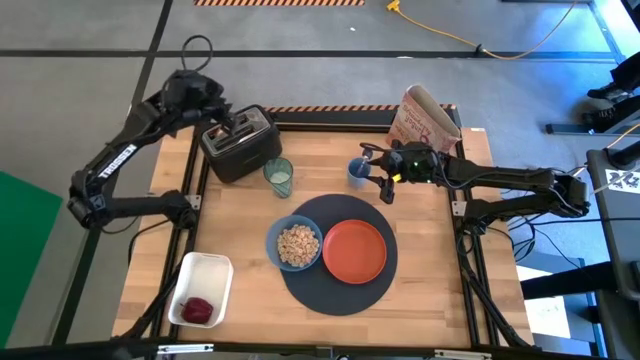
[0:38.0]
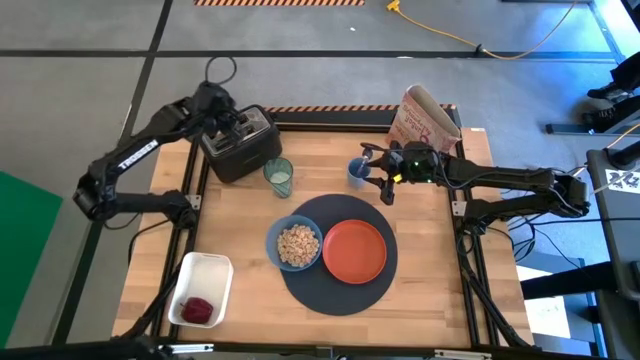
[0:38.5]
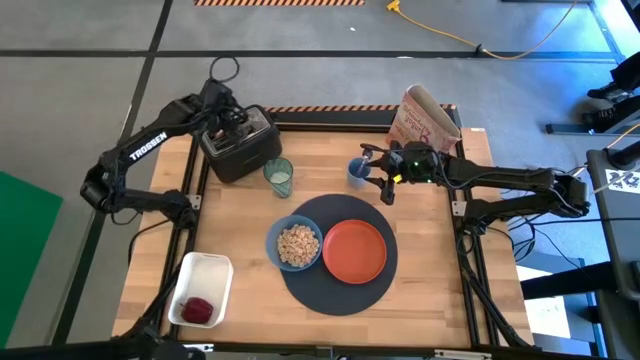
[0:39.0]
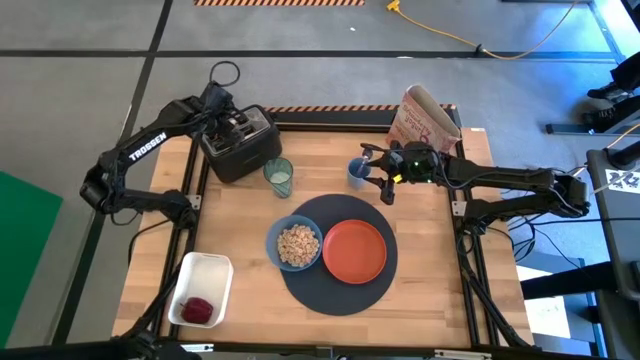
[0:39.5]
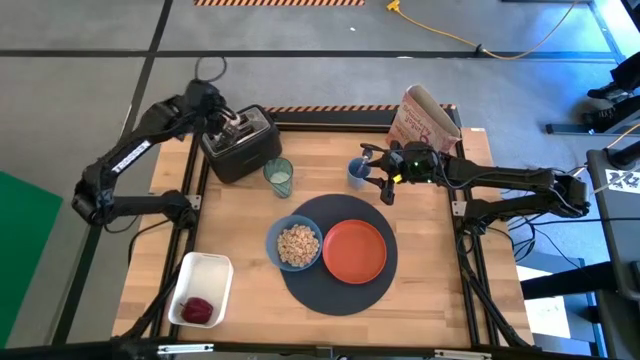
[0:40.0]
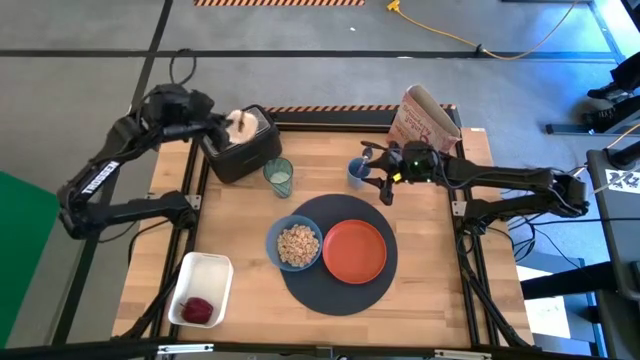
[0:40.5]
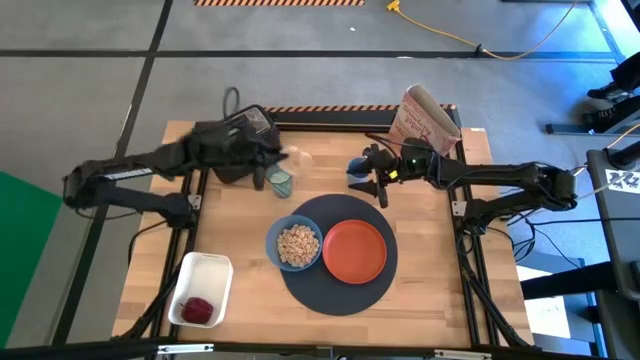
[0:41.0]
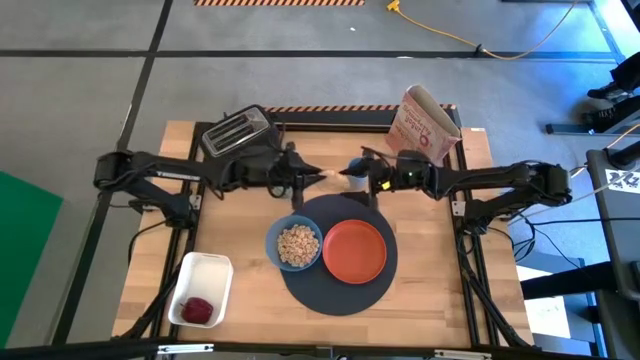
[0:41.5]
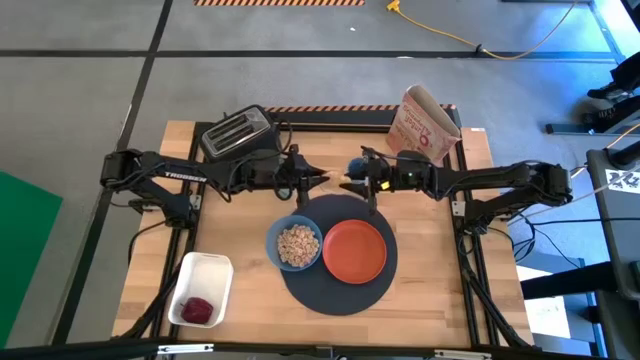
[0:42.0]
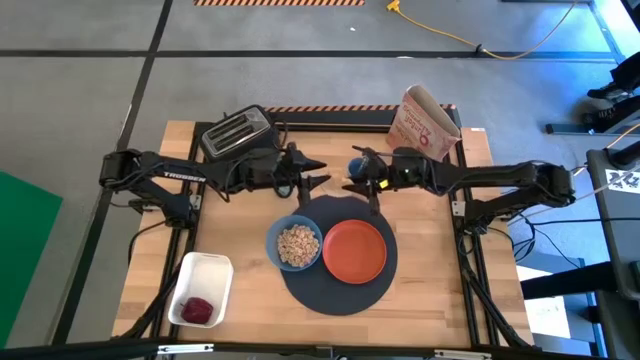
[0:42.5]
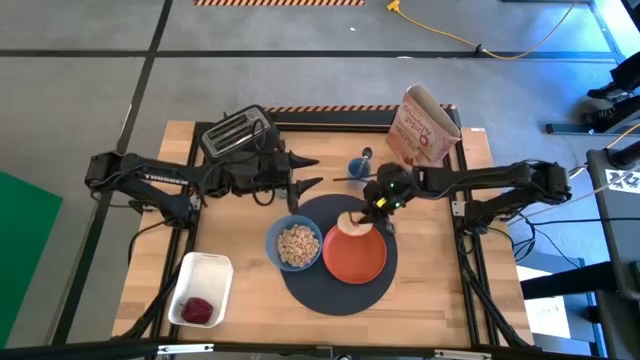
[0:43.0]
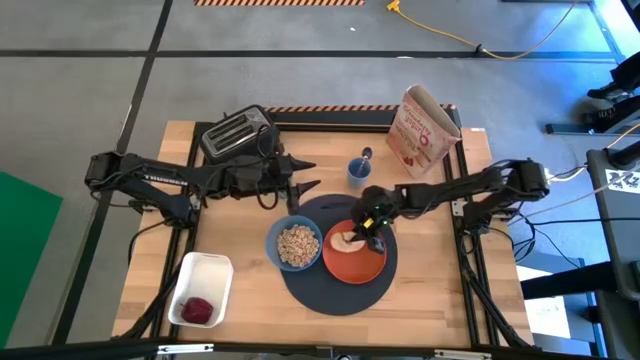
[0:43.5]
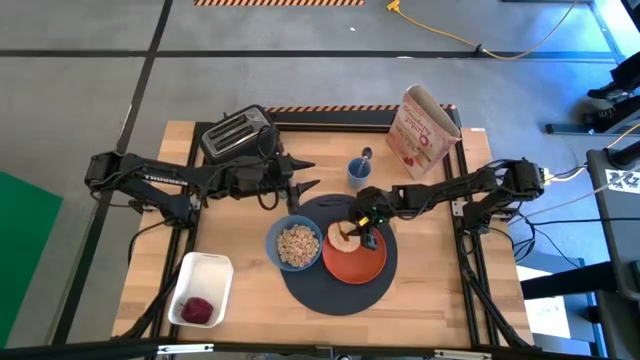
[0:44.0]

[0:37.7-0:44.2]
Task: Arrange a breakfast setting
Put the toasted bagel on the orange plate

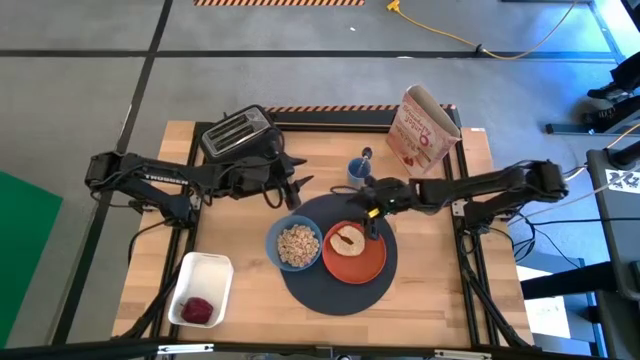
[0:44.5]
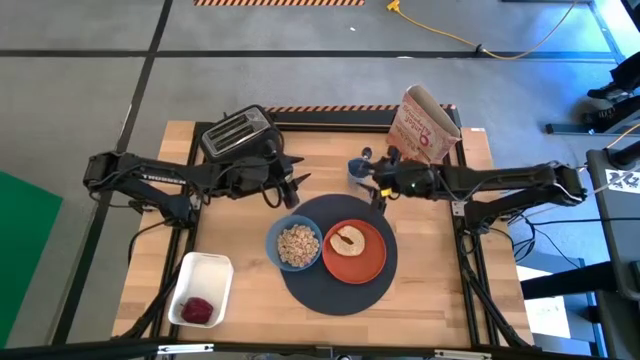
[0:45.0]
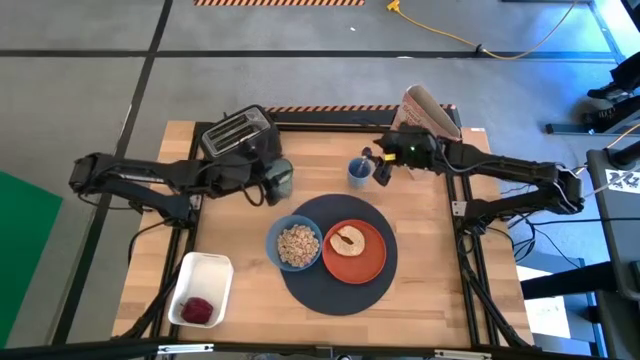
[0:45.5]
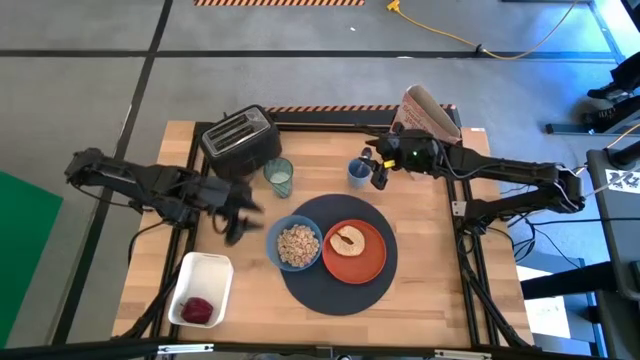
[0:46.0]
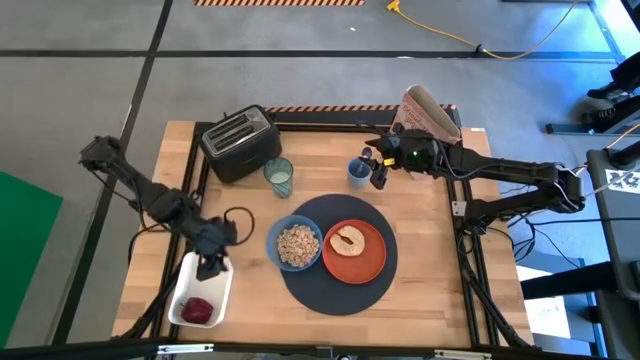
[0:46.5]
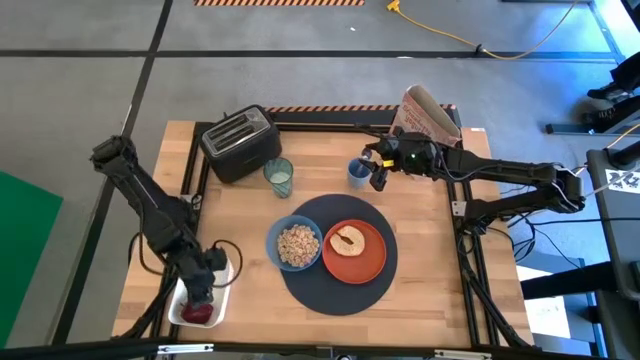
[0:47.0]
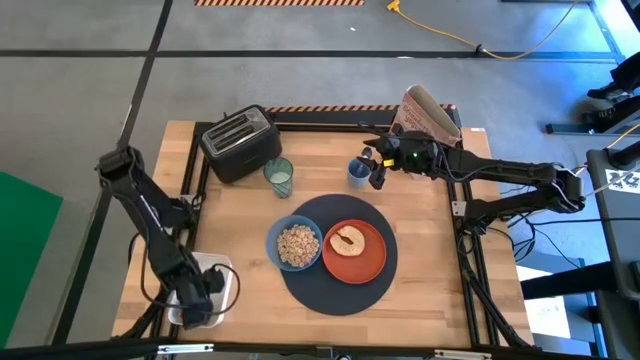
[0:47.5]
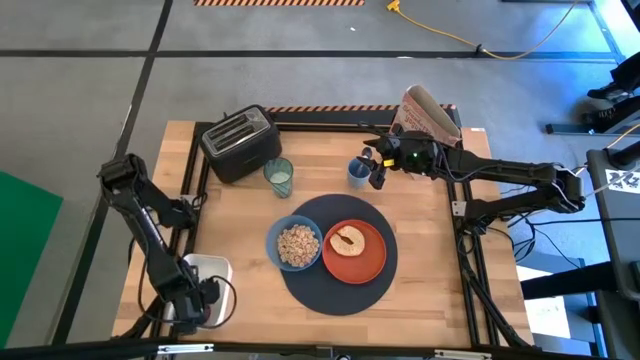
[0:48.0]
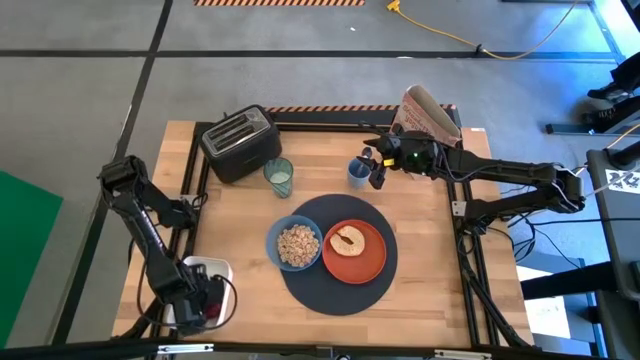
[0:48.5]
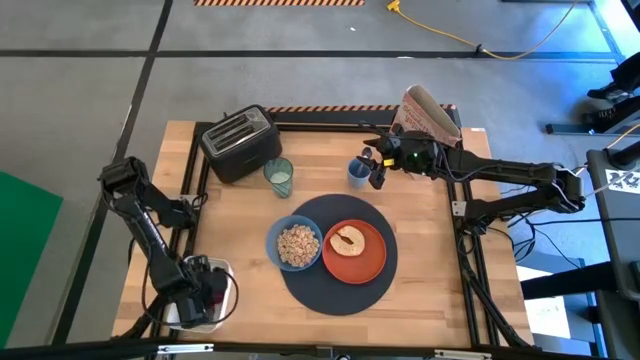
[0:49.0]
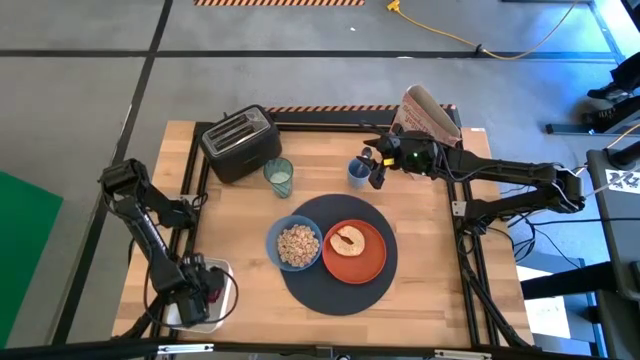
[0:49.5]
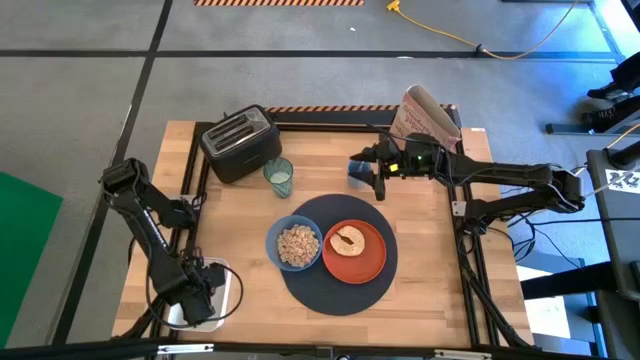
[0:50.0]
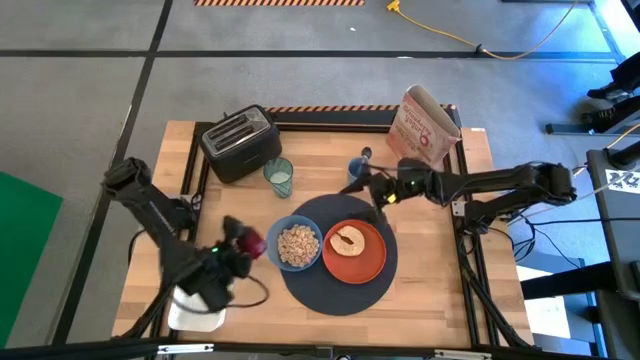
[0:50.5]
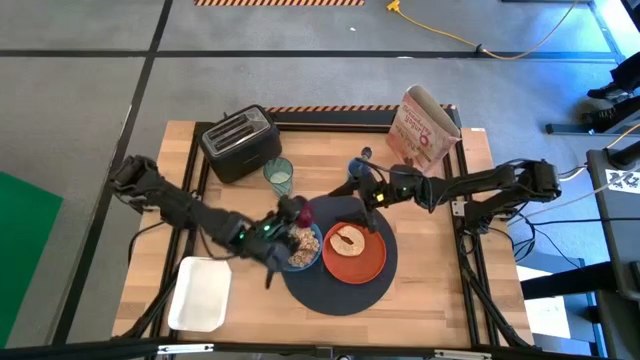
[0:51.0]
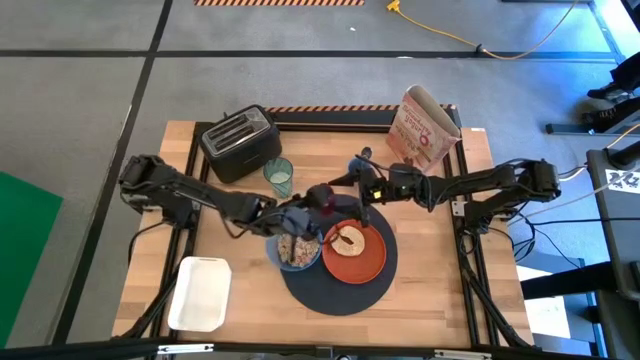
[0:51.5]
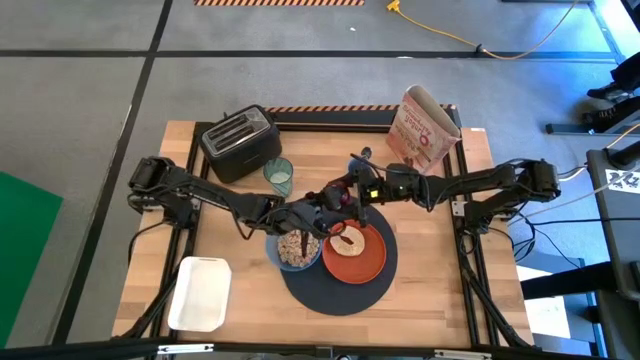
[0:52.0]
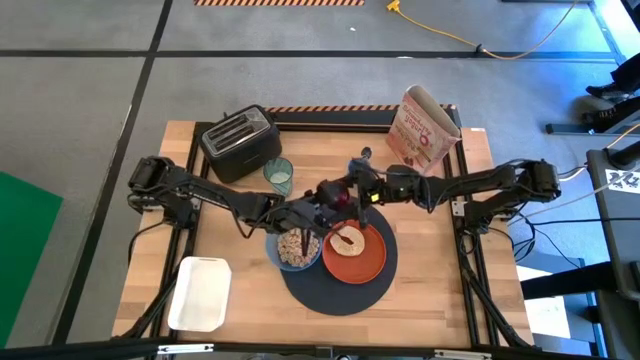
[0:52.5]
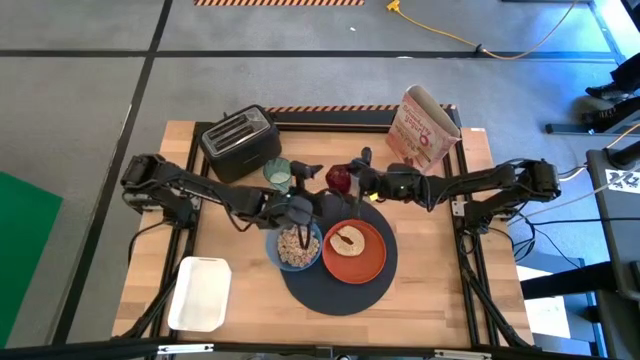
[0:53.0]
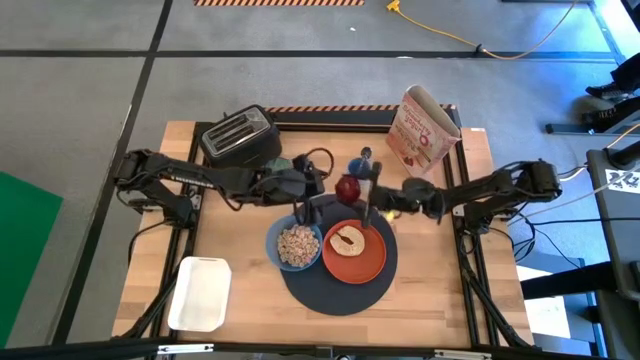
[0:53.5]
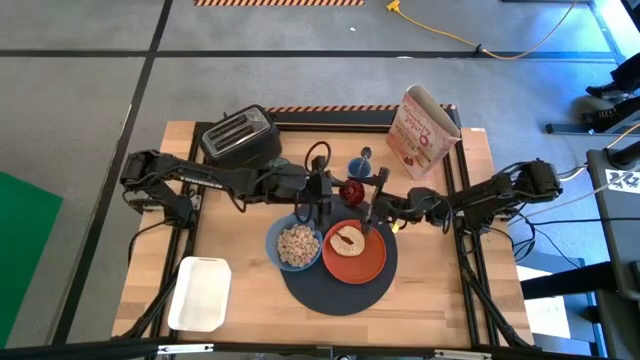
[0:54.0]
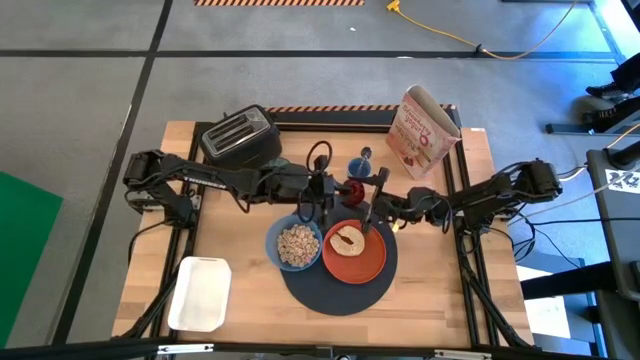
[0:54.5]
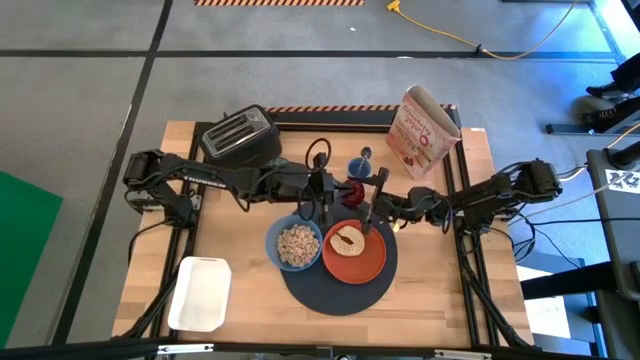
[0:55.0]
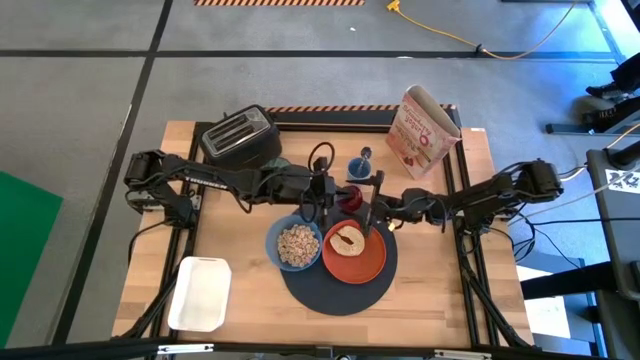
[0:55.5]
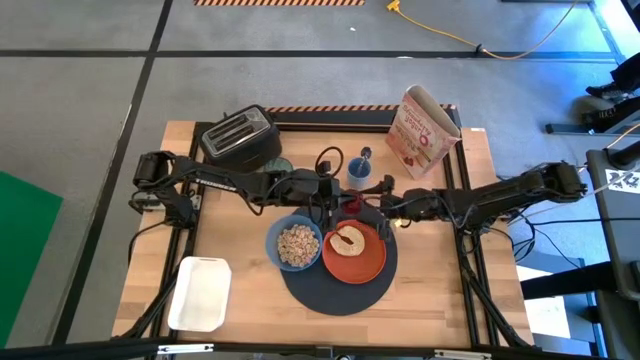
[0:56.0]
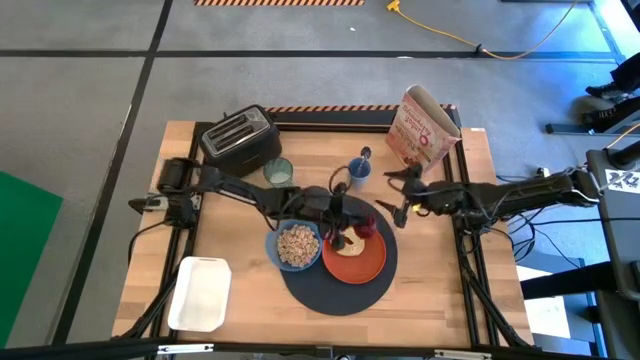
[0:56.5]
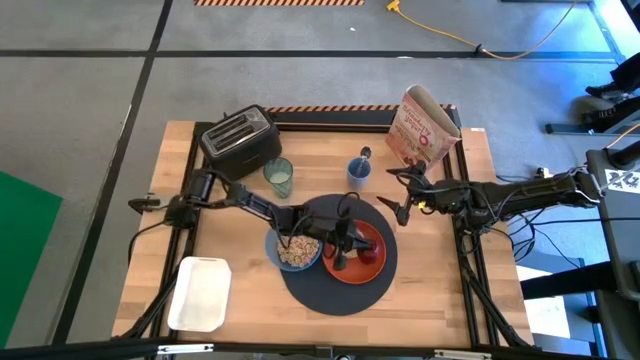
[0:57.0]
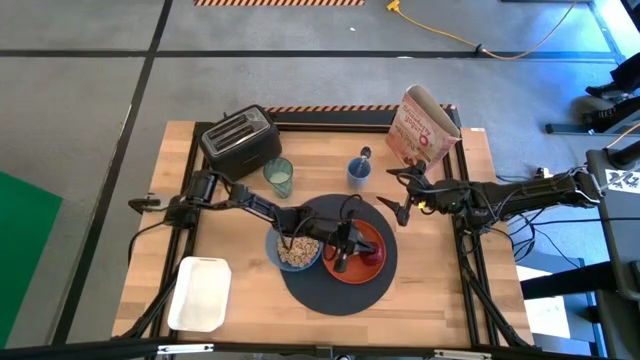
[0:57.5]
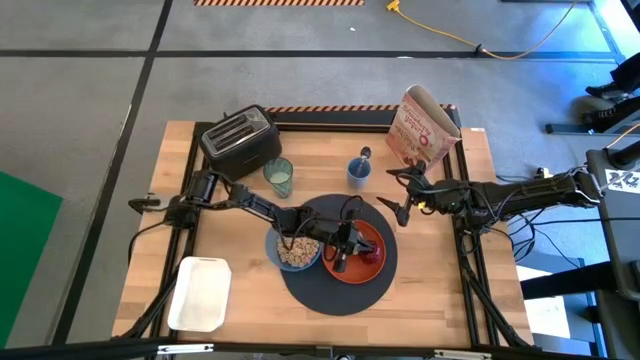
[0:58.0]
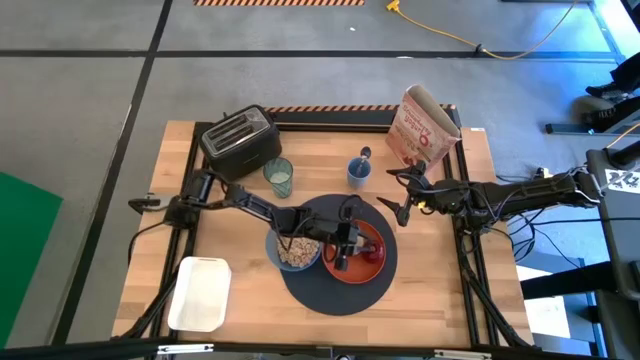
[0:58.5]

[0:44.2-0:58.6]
Put the apple on the orange plate
